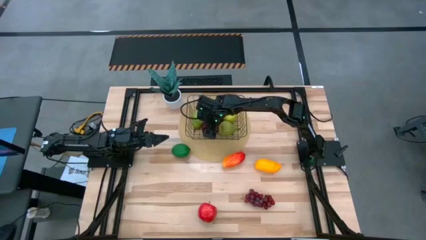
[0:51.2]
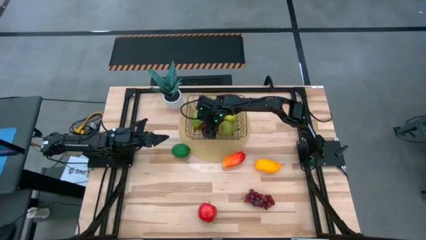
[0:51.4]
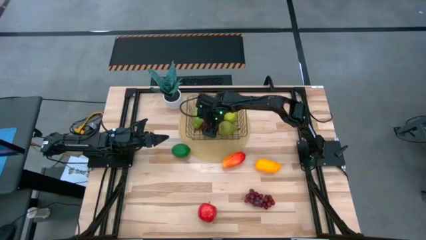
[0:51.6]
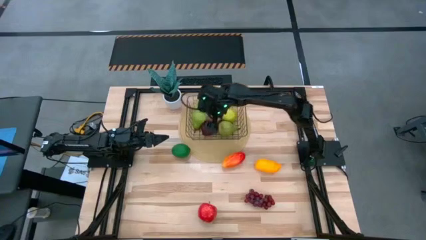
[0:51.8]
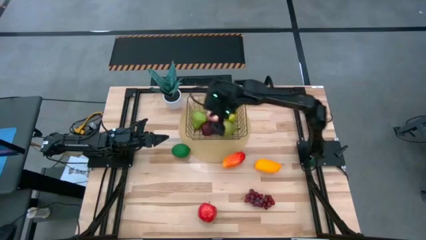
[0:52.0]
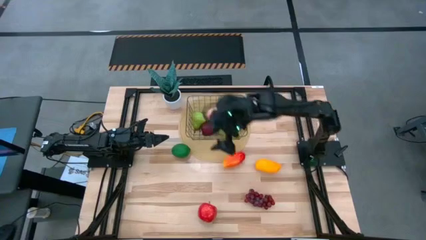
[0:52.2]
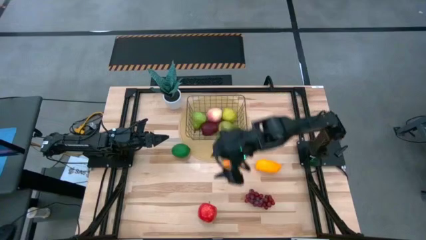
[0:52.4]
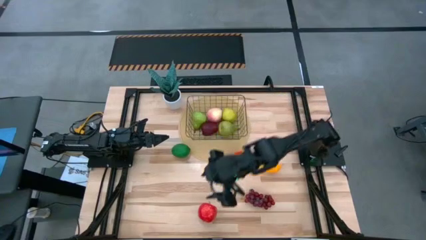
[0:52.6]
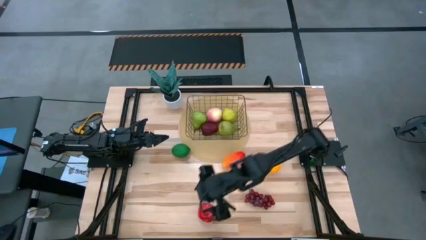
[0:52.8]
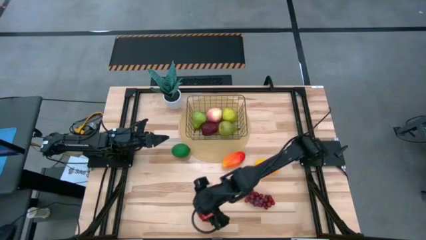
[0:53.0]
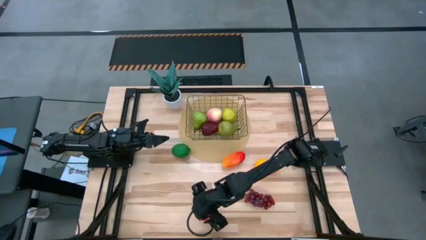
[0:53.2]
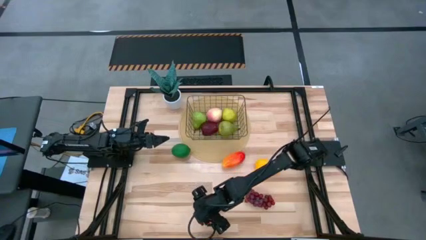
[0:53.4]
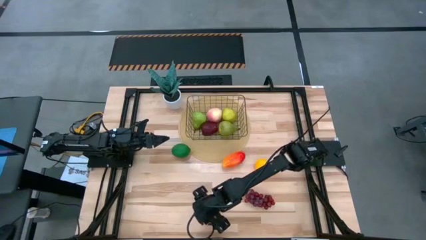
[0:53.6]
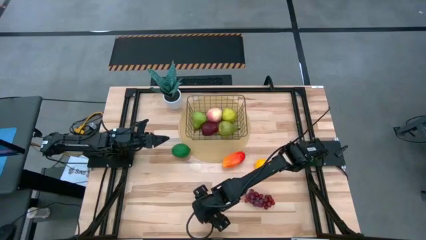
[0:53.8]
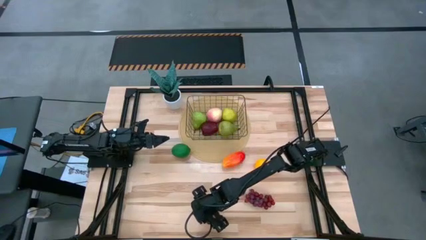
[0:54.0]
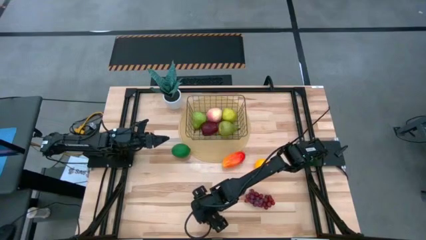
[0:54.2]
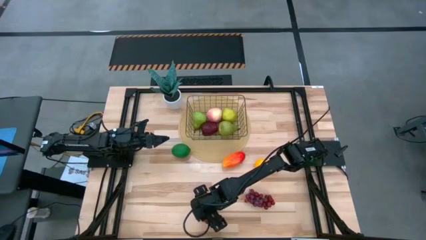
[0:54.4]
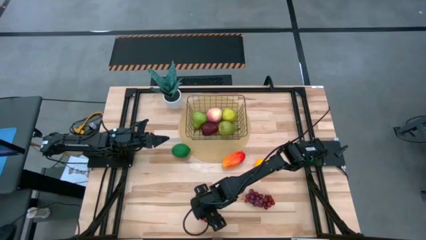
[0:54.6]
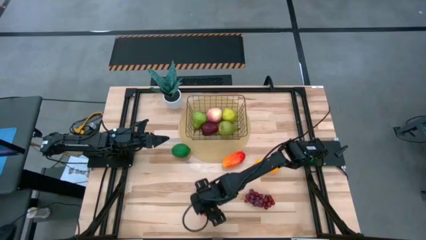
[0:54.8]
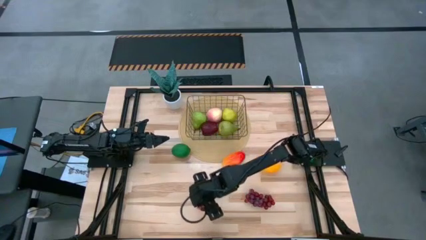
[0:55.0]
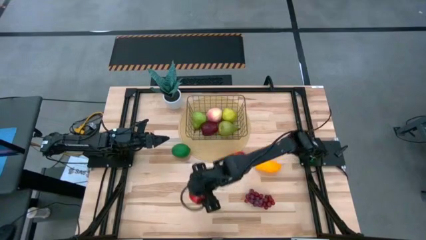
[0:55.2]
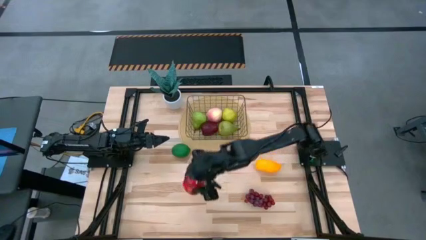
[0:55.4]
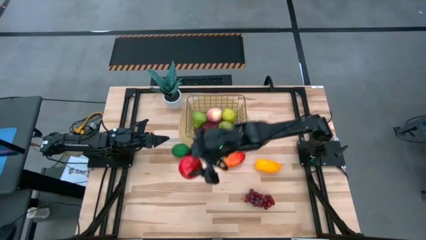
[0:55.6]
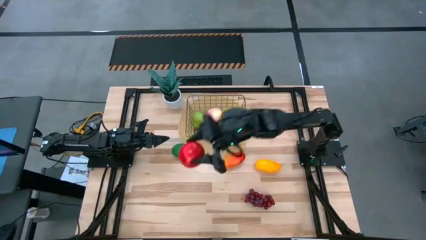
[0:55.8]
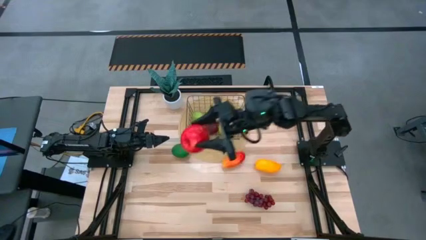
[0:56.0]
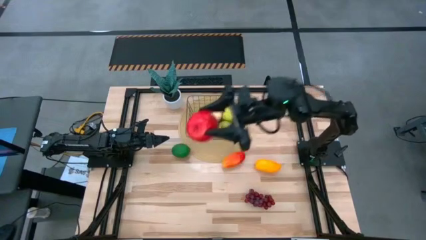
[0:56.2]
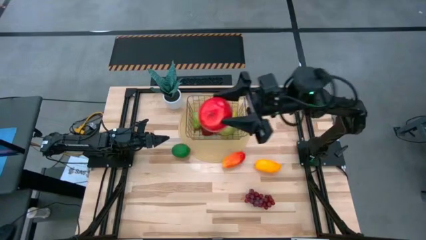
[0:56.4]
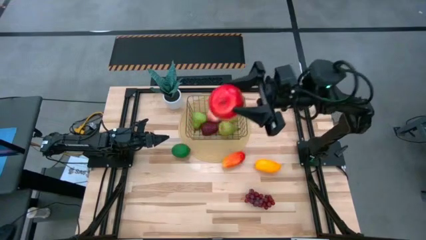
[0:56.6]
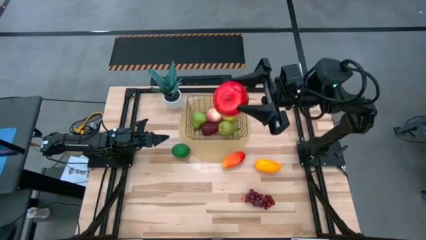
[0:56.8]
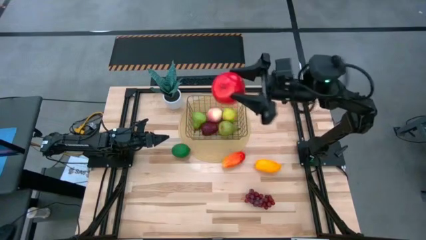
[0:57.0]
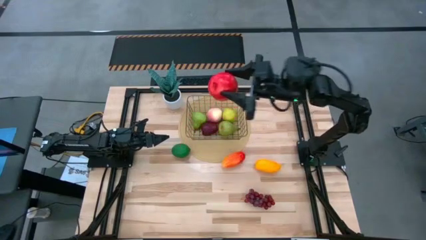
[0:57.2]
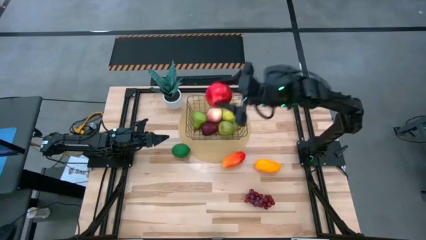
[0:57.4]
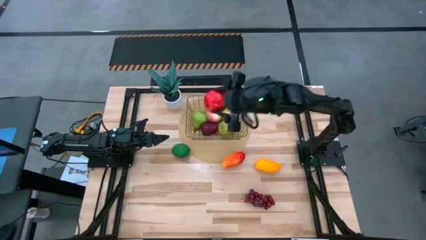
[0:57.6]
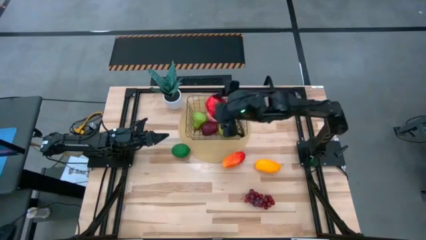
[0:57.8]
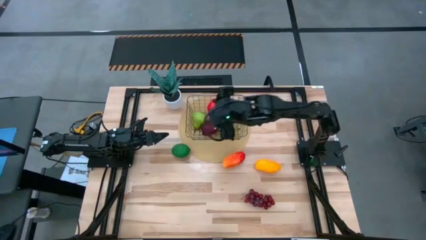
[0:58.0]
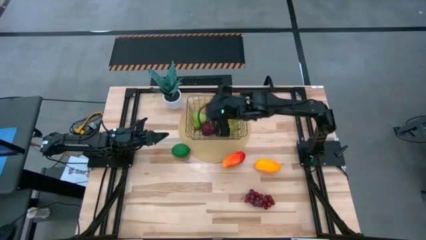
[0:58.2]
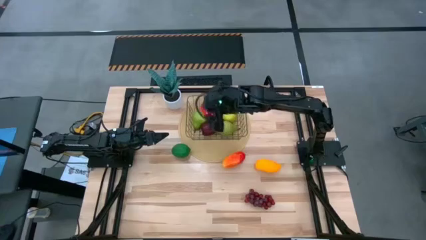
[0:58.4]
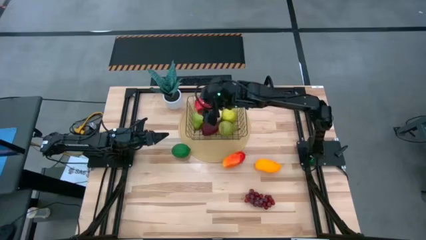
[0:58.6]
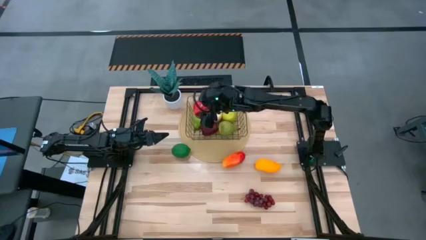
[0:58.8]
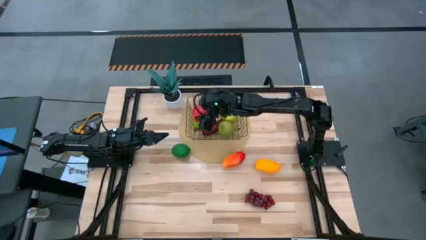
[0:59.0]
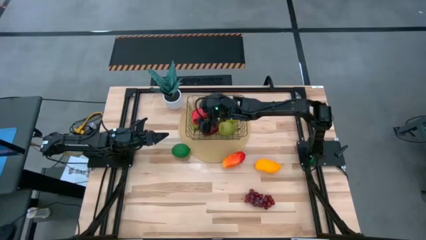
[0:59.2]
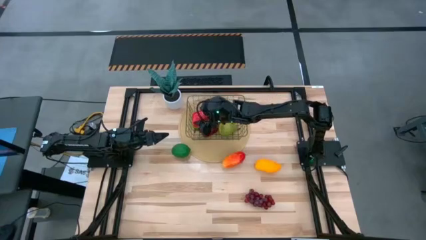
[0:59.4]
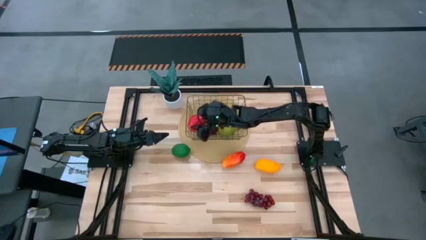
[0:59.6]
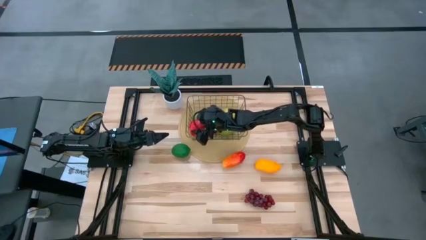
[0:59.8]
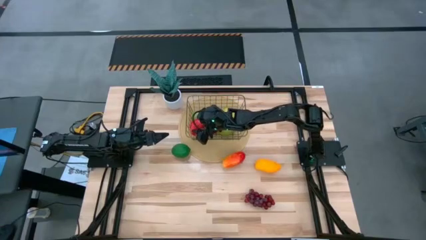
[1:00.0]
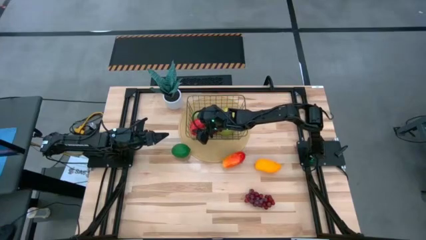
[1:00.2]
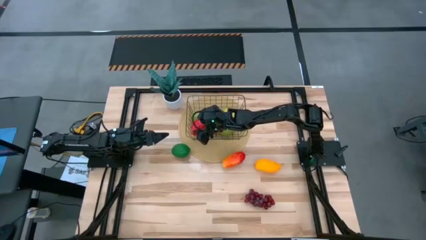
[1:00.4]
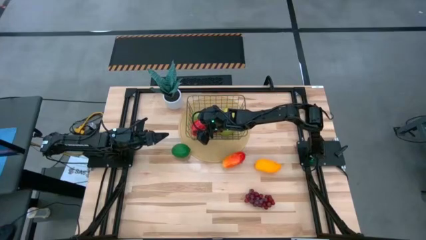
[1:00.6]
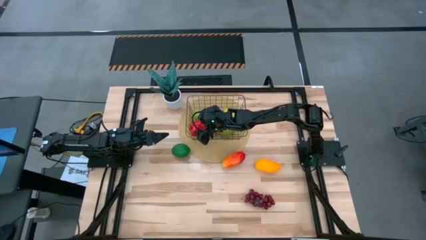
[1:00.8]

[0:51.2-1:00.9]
Task: Build produce basket
Put the red apple into the wire basket

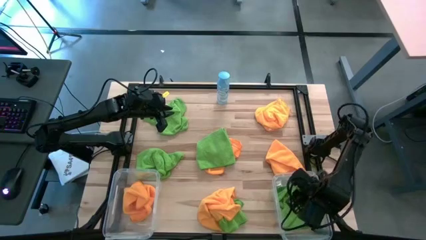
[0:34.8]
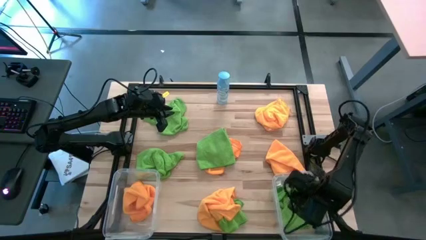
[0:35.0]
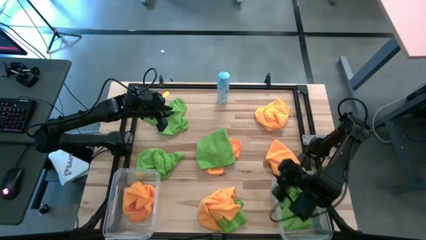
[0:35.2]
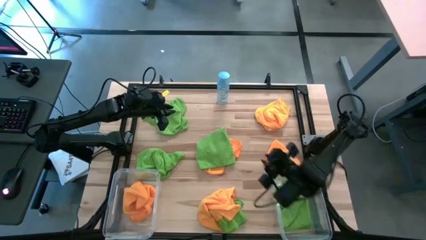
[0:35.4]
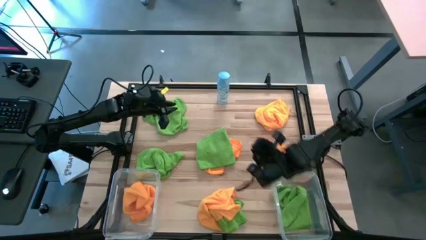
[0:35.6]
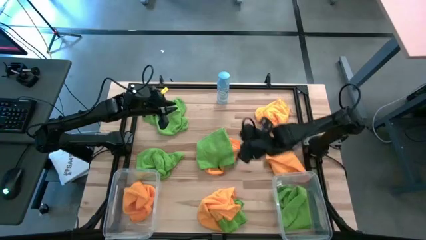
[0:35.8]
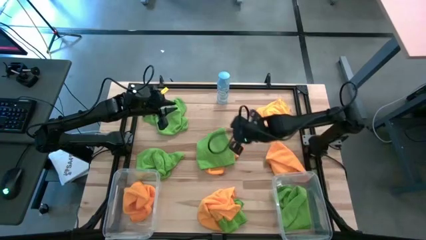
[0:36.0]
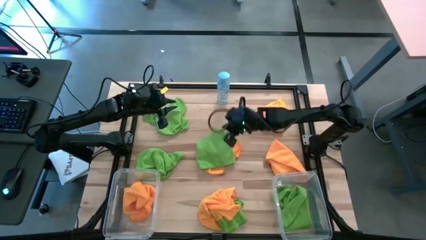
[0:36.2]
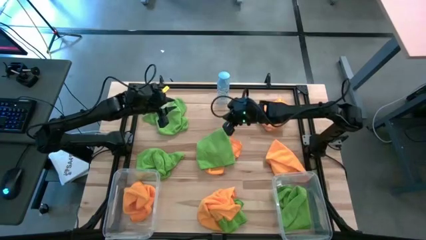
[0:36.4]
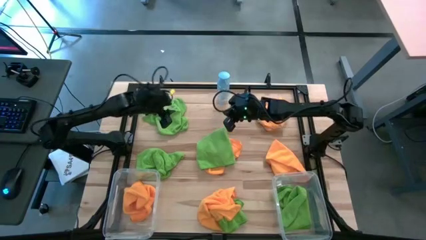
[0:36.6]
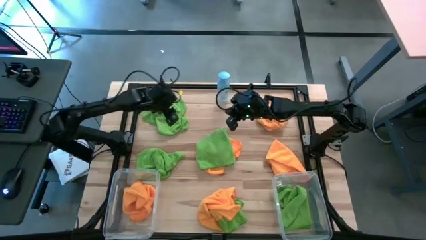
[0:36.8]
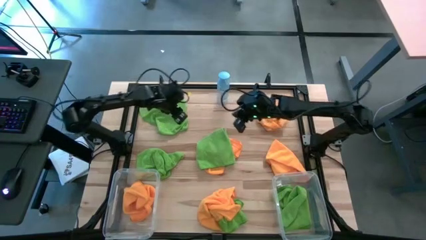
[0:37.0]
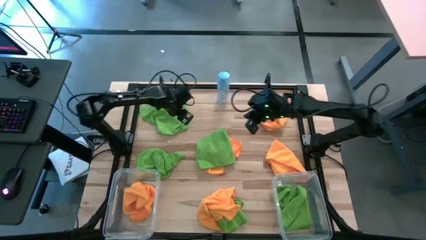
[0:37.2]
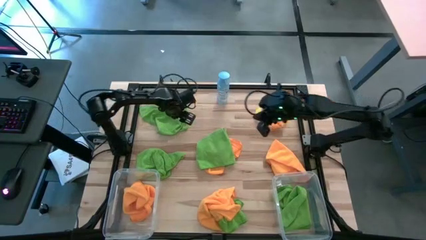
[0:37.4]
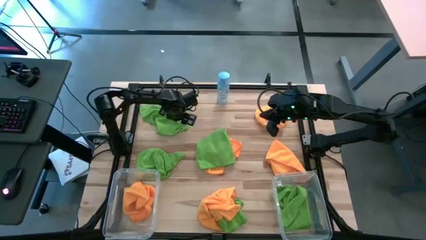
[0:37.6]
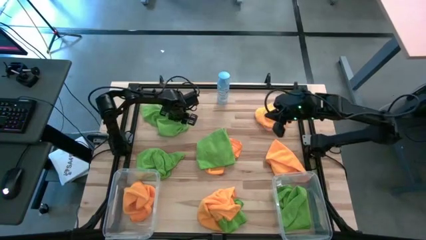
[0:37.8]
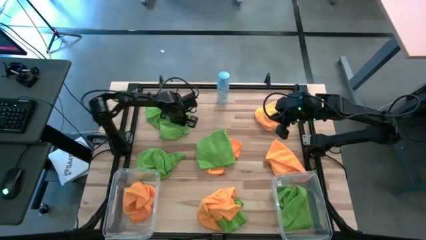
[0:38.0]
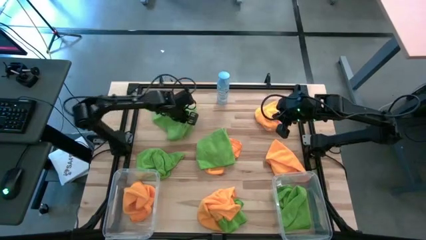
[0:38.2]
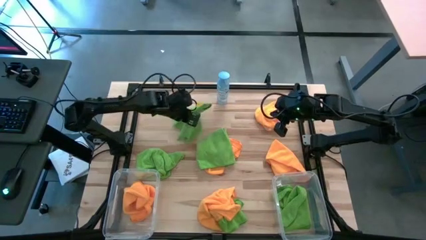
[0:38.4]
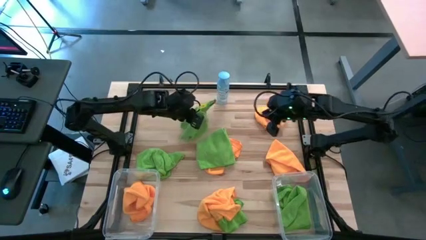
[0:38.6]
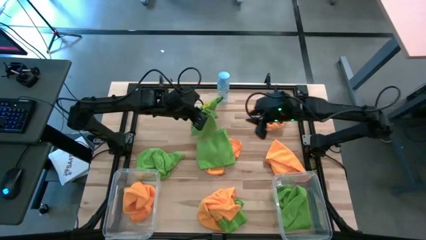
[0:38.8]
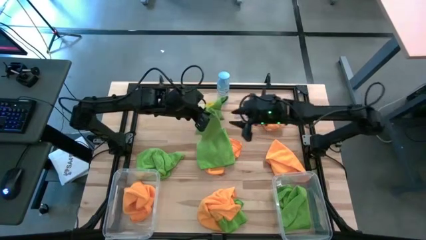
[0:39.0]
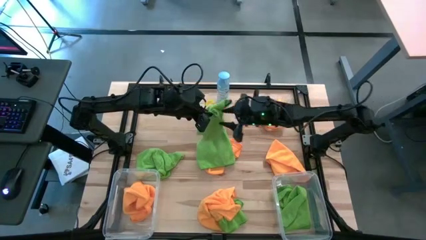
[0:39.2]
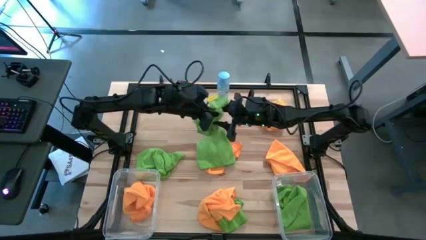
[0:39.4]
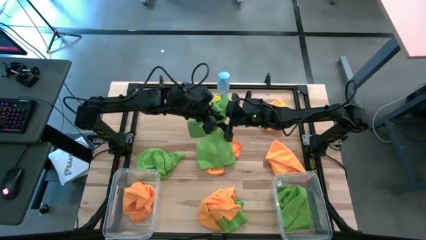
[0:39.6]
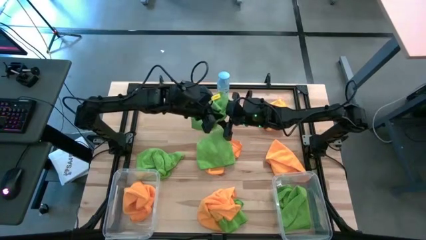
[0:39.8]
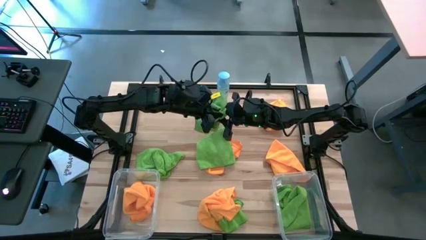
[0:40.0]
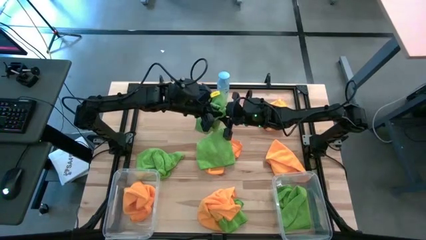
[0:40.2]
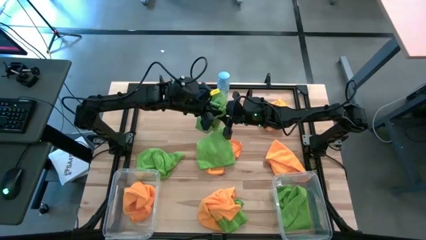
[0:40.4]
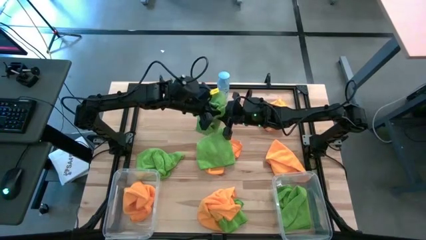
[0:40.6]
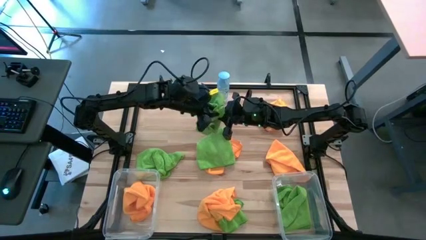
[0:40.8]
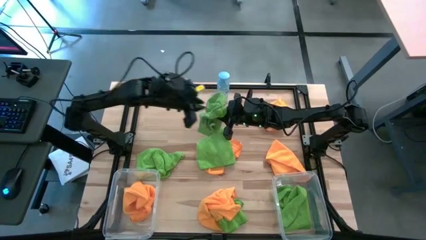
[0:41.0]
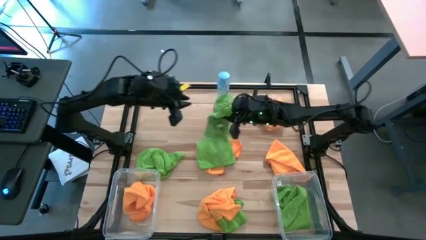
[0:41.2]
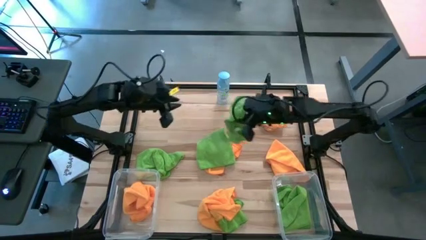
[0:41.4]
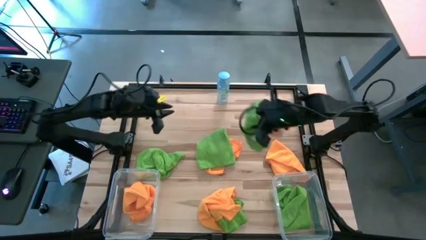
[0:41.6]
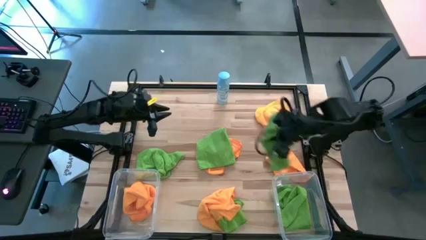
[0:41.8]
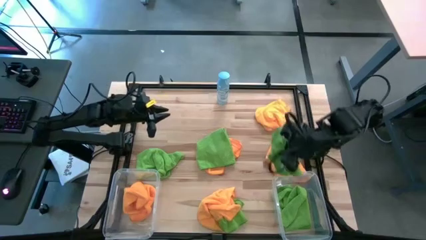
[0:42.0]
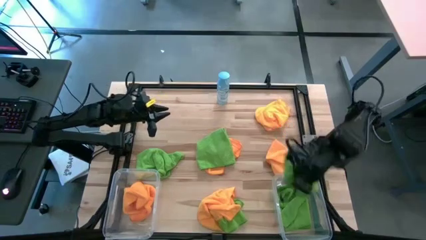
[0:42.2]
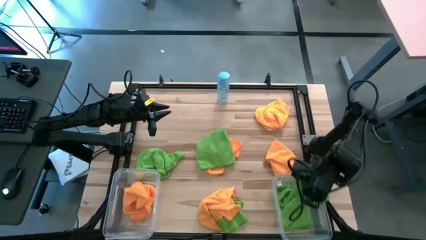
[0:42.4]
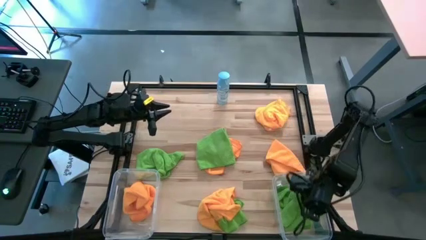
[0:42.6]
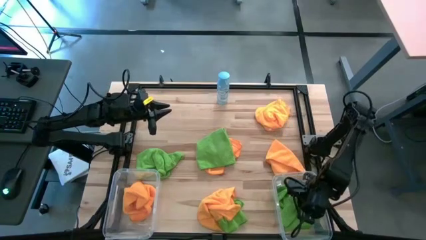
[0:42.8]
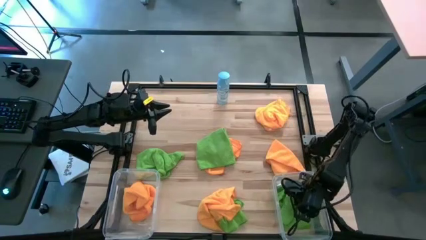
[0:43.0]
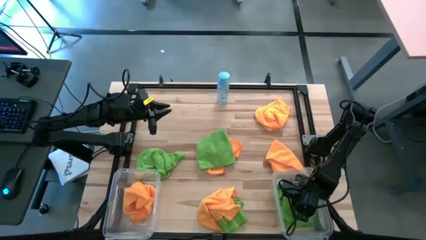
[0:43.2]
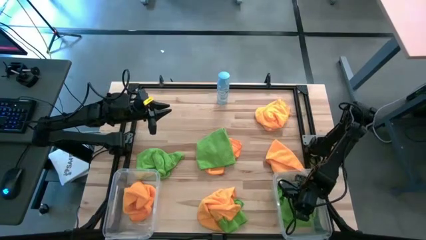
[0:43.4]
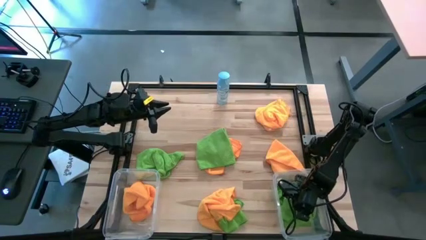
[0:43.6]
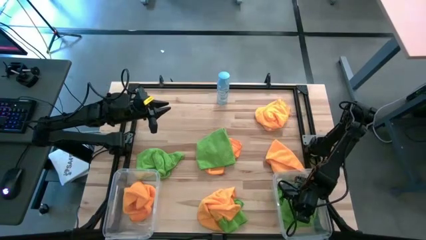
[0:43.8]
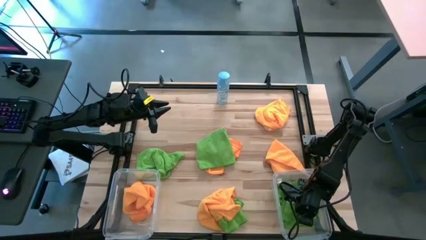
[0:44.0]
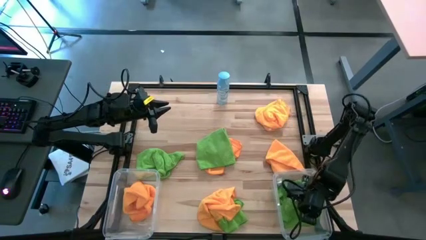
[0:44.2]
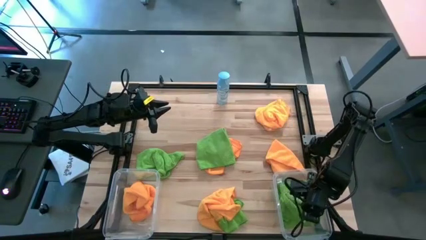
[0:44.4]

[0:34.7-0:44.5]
Task: Sort microfiber towel by color & place in baskets
Put the green microfiber cloth into the right transparent bin
